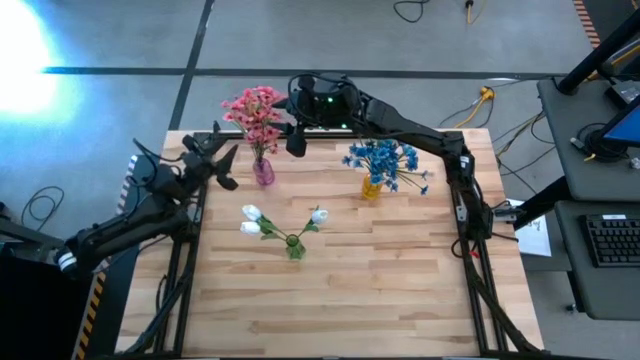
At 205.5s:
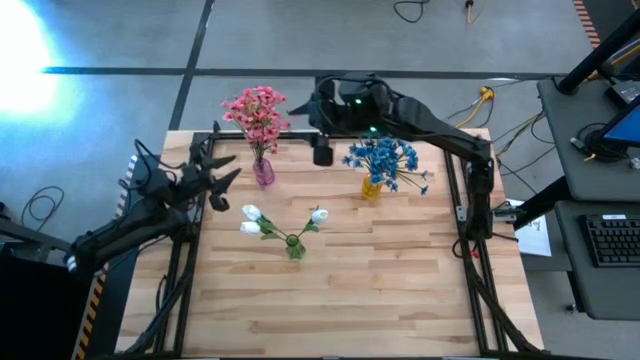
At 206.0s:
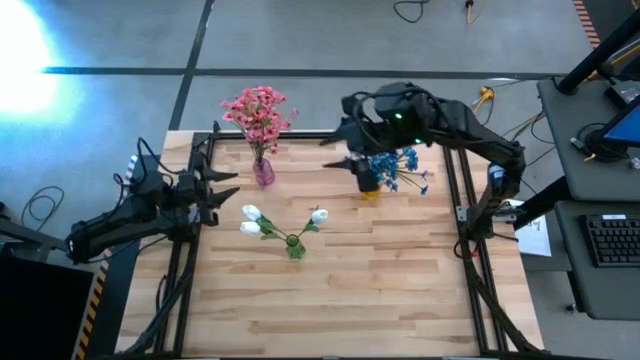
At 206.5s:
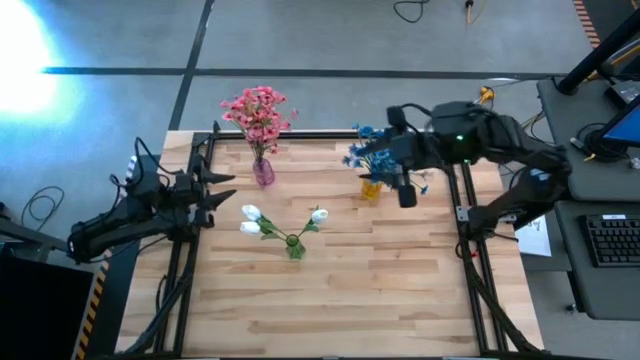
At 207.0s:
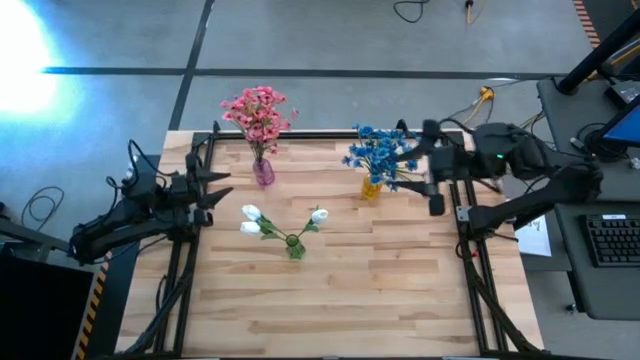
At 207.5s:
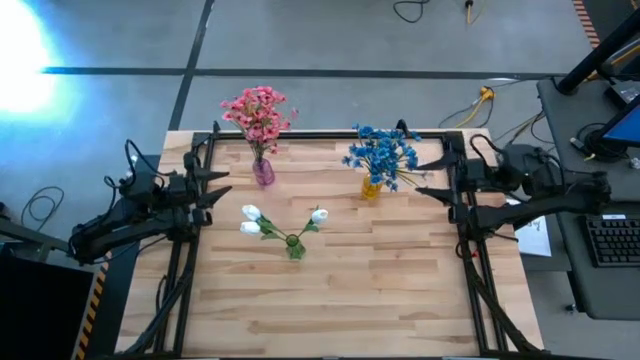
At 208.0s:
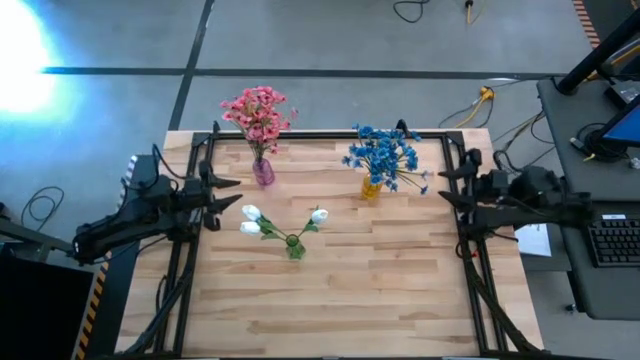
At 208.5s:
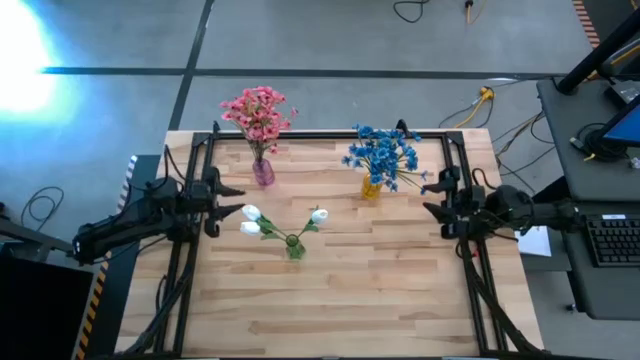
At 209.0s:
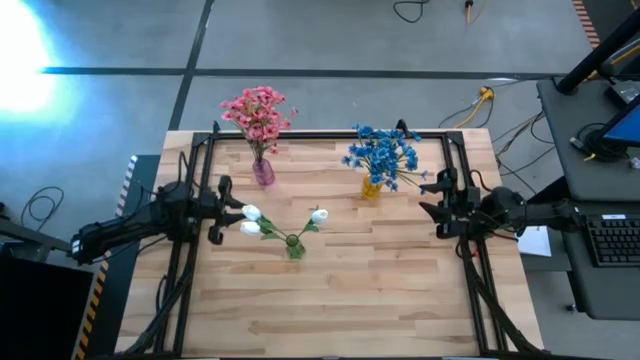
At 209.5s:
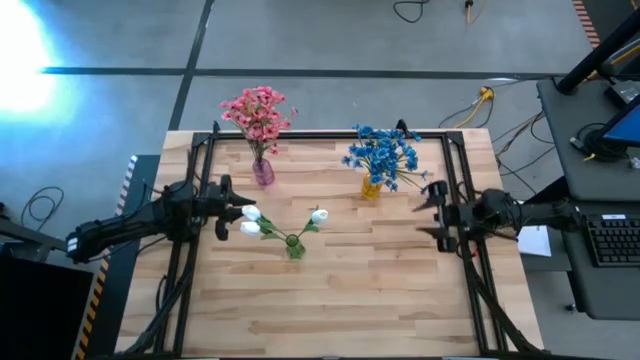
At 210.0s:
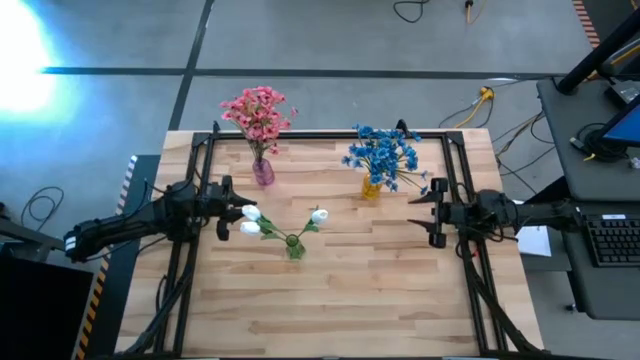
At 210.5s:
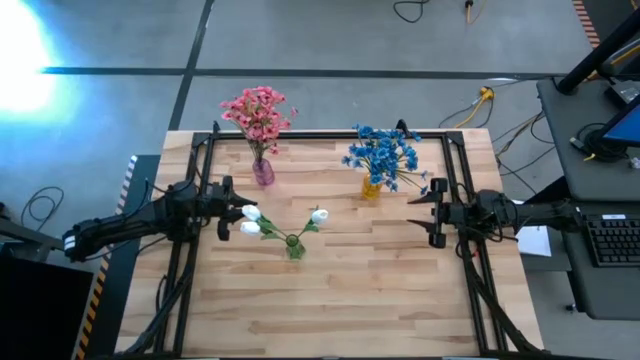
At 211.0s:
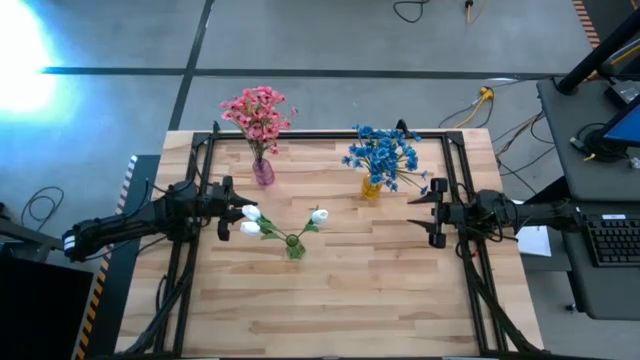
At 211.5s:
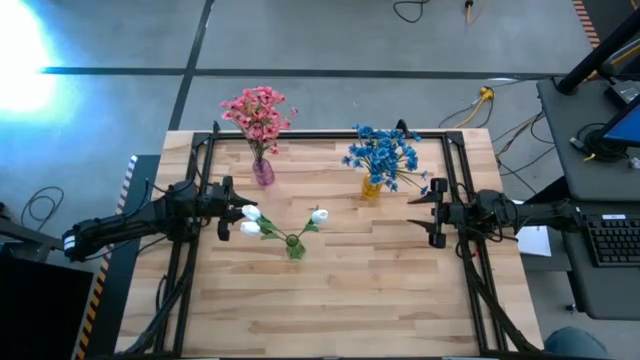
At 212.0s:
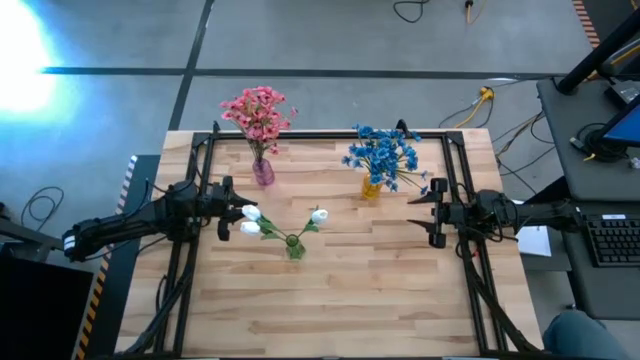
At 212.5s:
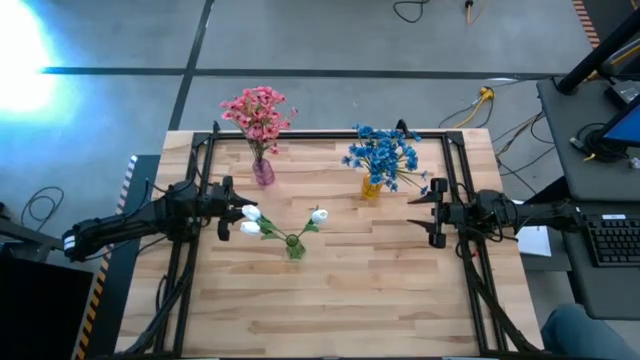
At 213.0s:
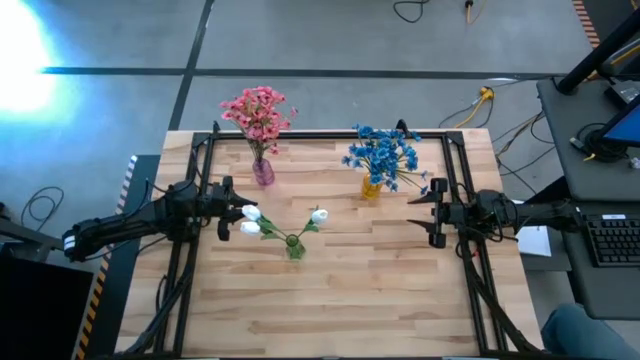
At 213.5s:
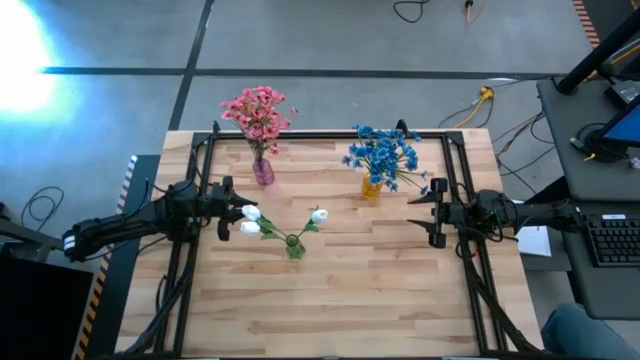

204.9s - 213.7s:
Task: Sort flowers into vase by color
Return to Home Position

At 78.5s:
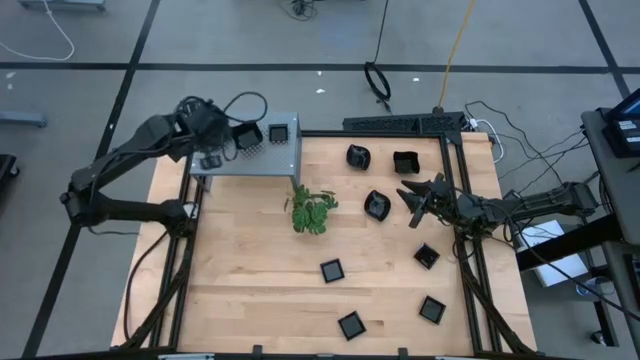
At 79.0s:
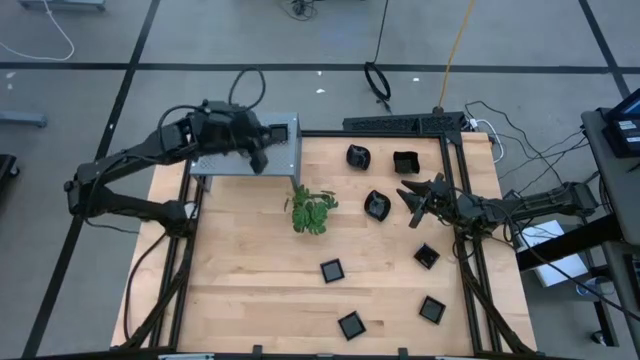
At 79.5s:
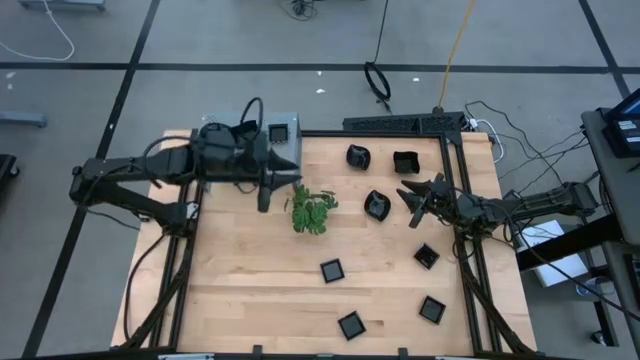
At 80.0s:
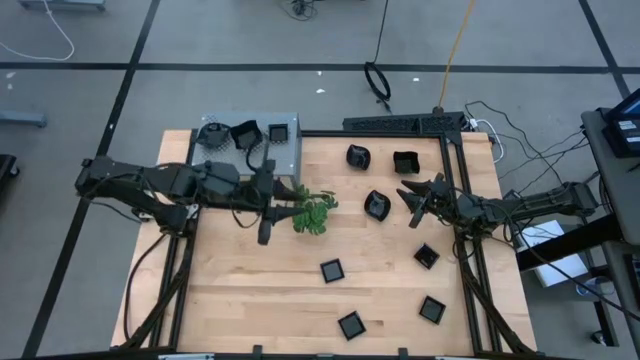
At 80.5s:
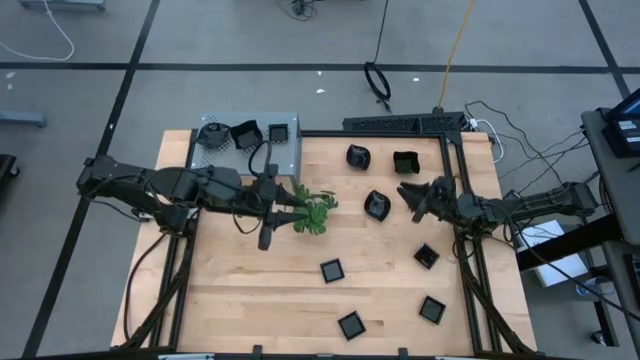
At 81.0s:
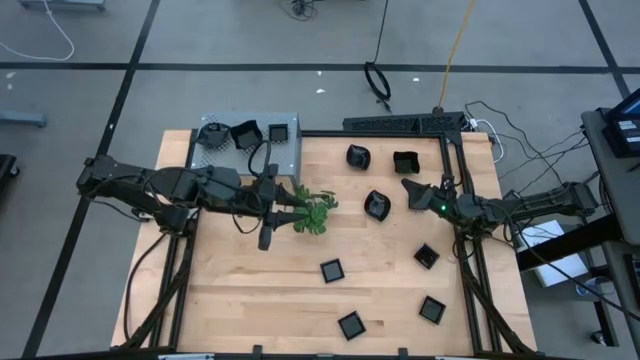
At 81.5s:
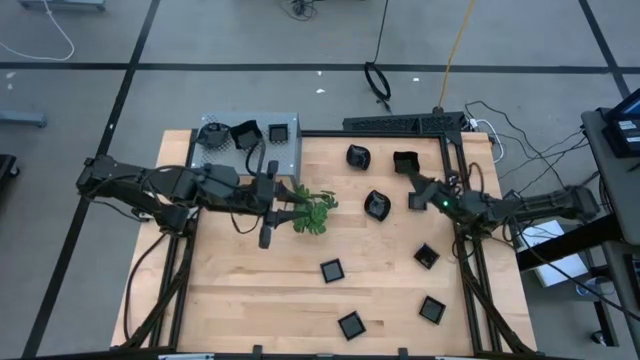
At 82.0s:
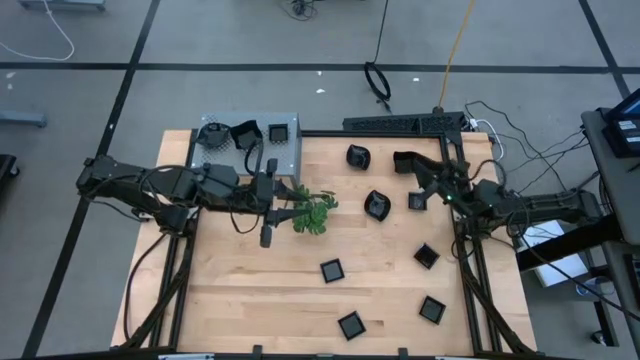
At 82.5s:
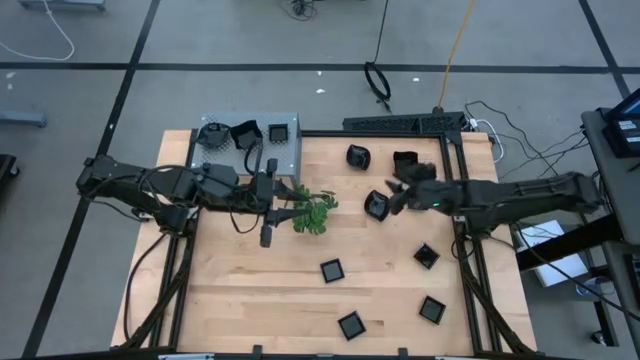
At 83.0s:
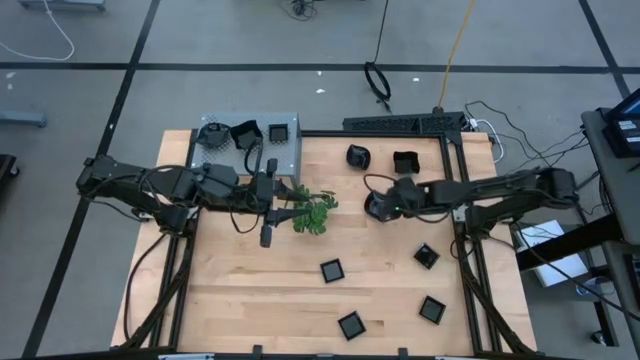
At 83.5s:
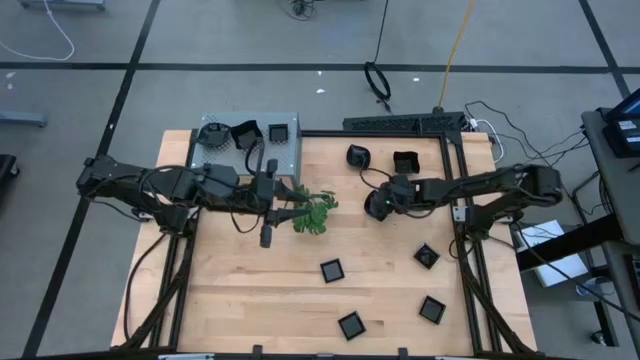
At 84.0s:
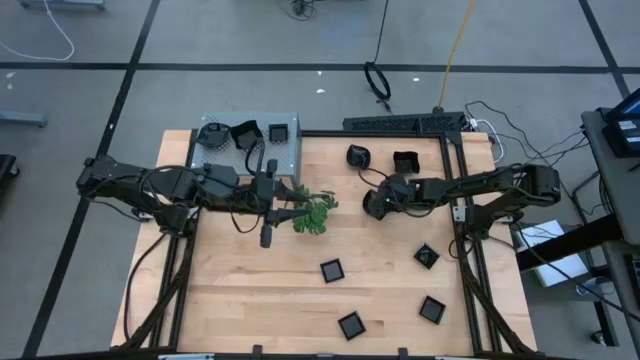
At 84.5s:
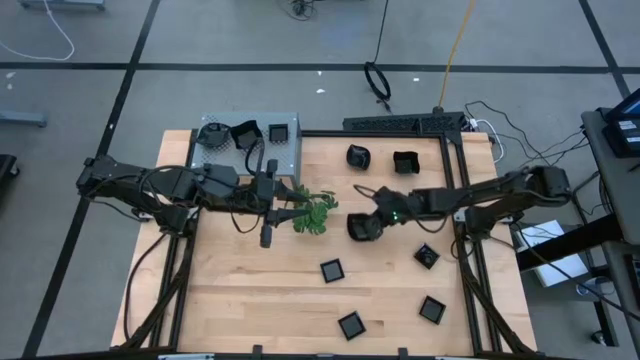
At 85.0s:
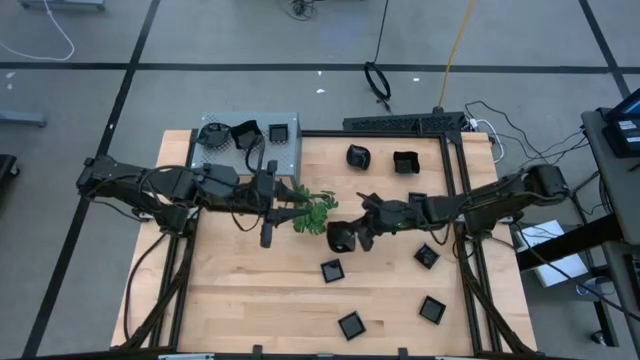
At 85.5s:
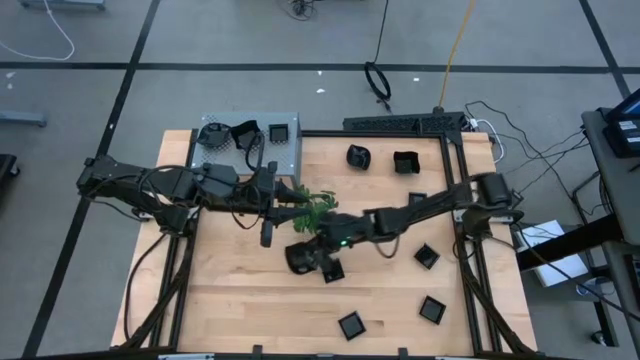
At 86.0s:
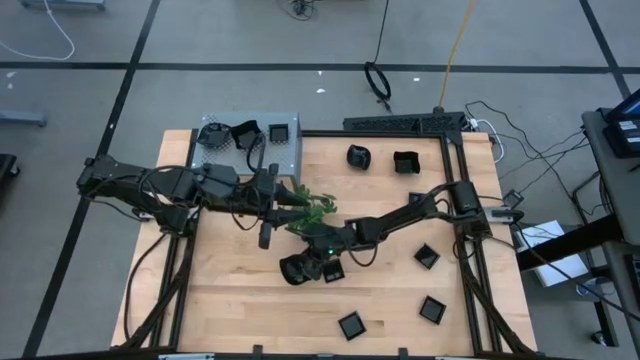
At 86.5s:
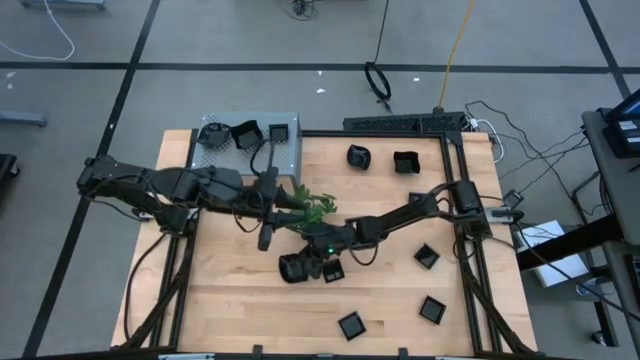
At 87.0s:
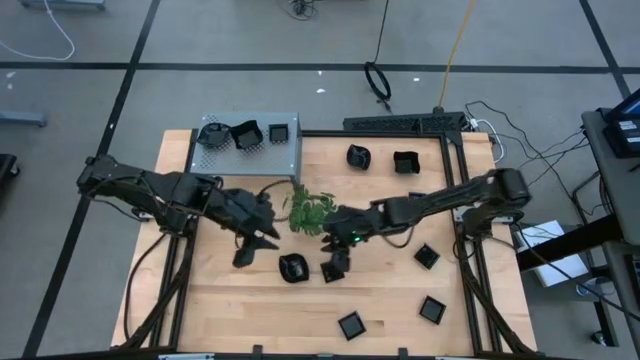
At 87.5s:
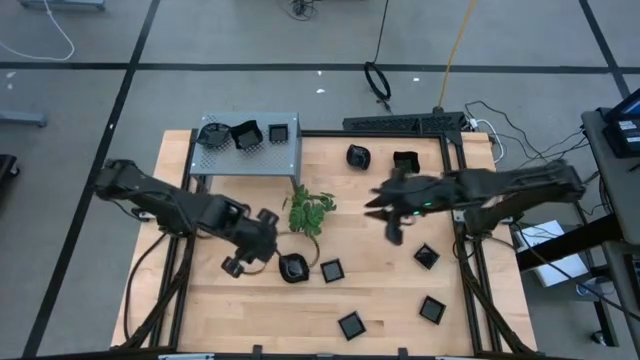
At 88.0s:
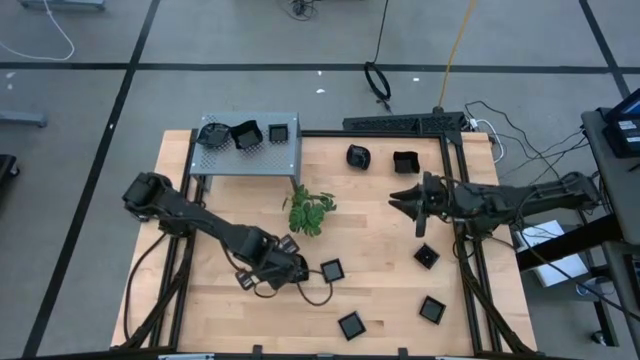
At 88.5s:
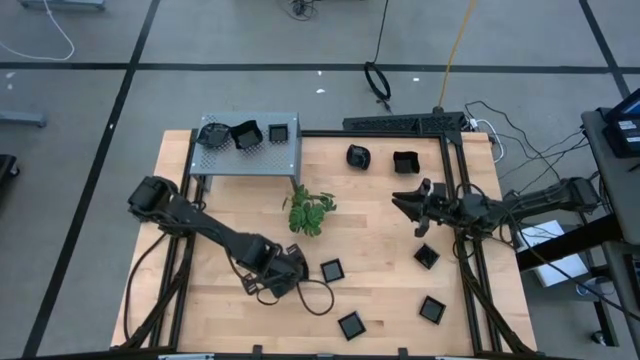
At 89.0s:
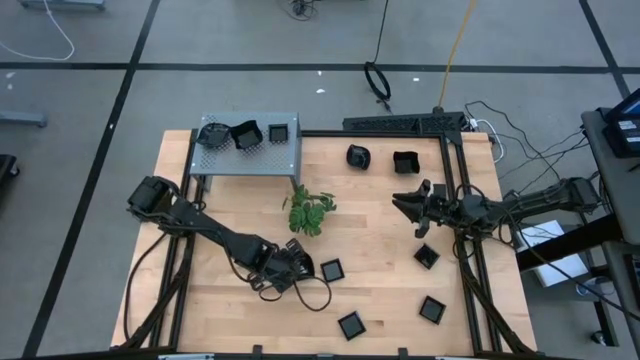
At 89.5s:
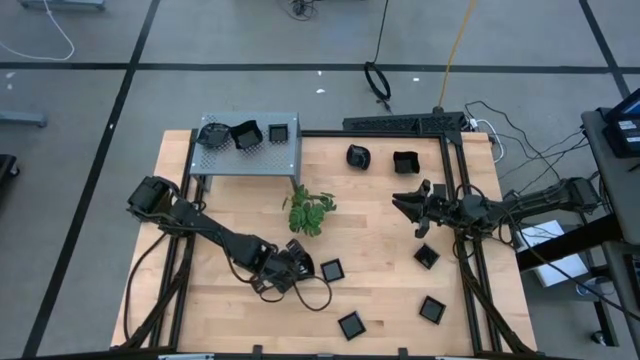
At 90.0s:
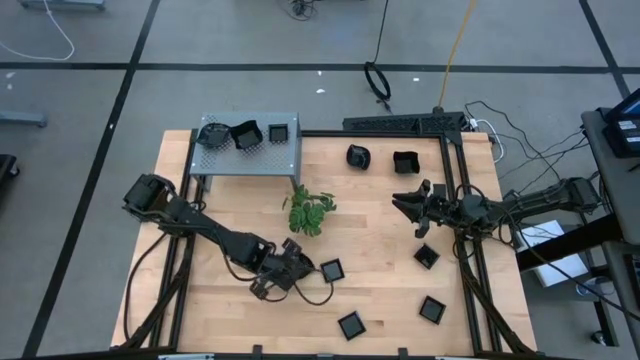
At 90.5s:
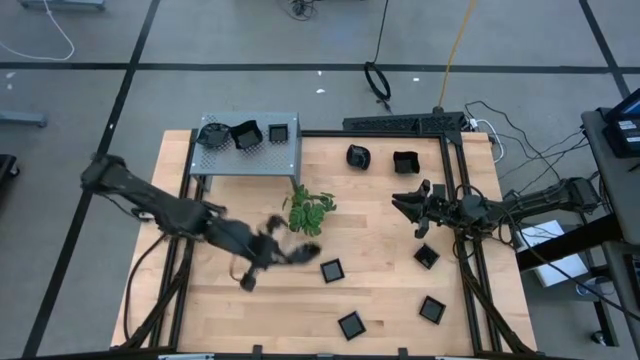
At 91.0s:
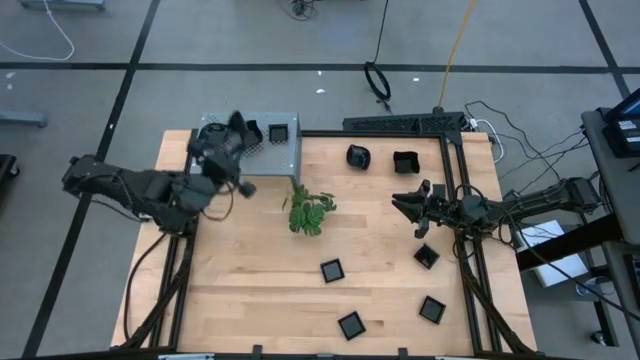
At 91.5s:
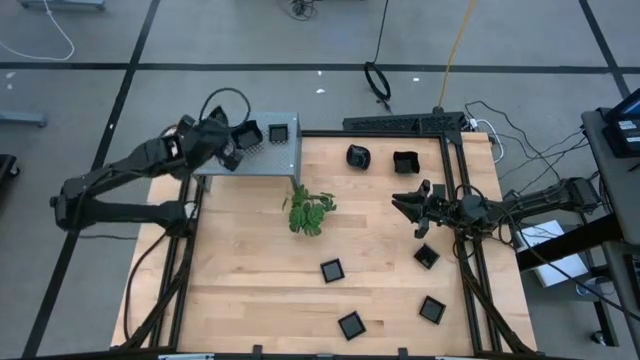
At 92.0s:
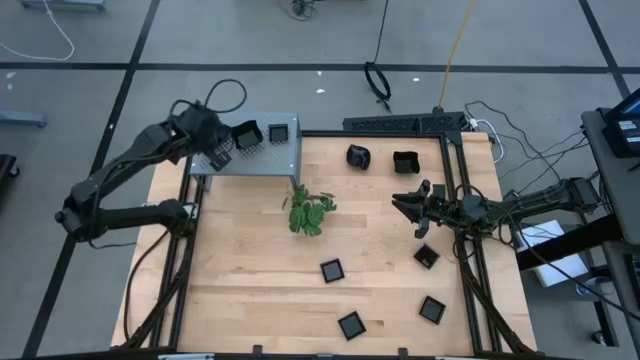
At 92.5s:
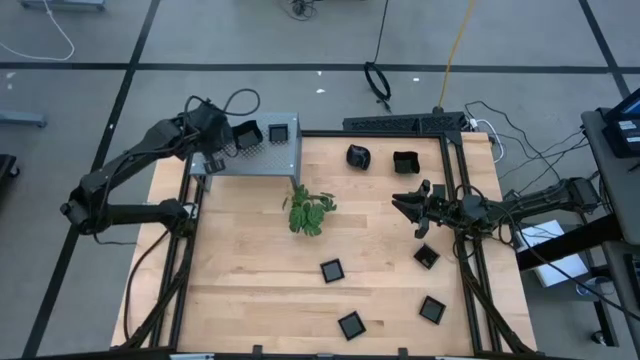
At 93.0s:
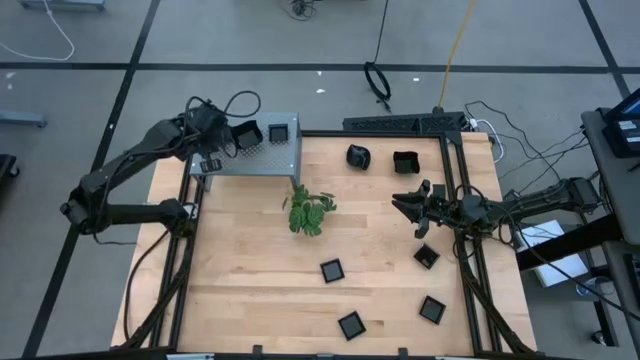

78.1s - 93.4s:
Task: Pick & Place Mini shaped plates
Stack the leaf shaped plate on top of the leaf shaped plate on the shelf
